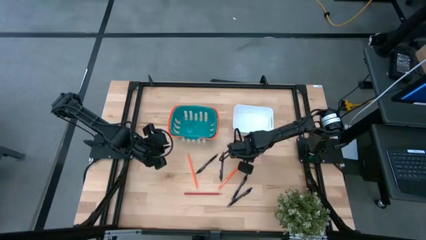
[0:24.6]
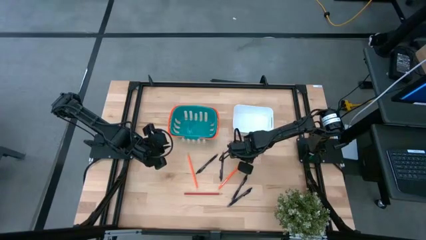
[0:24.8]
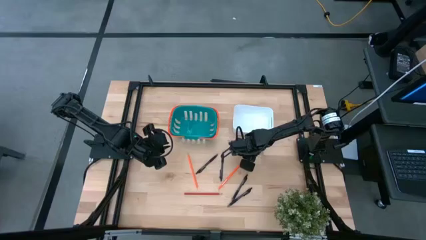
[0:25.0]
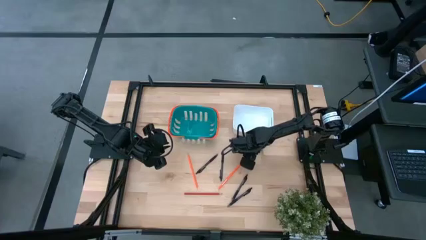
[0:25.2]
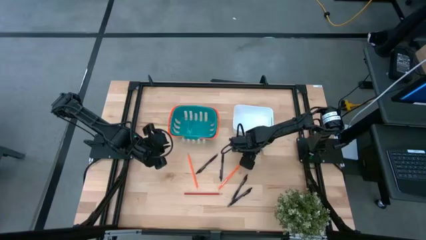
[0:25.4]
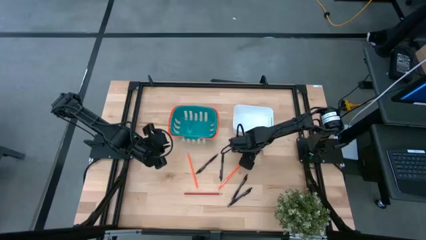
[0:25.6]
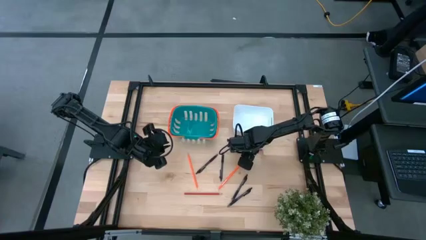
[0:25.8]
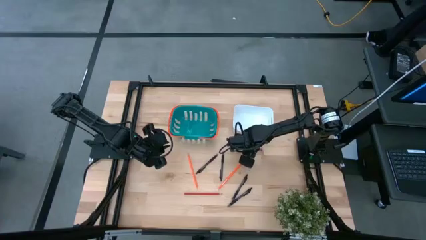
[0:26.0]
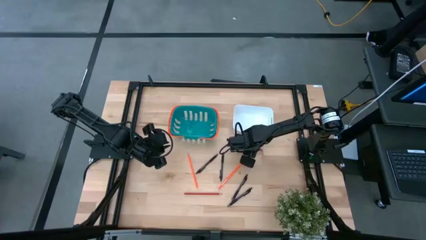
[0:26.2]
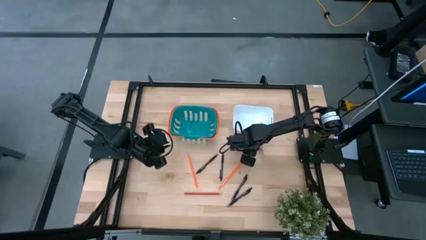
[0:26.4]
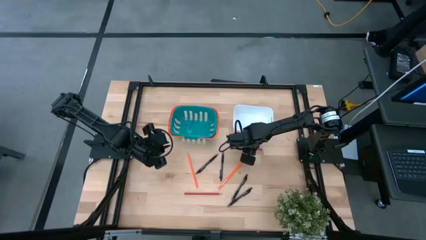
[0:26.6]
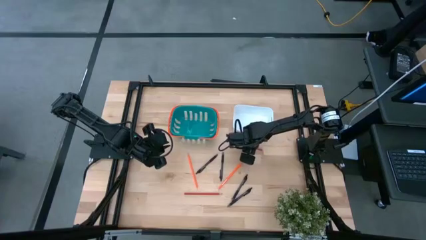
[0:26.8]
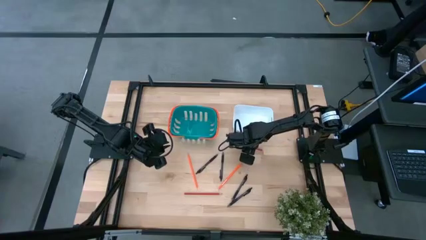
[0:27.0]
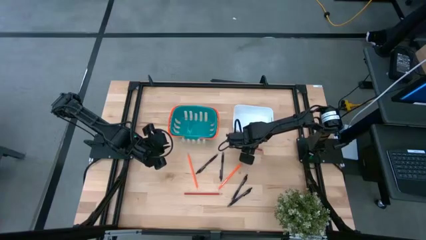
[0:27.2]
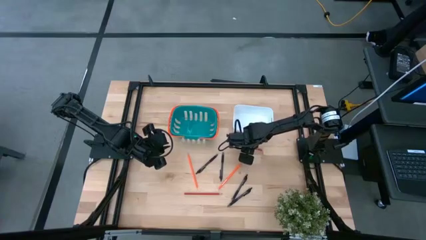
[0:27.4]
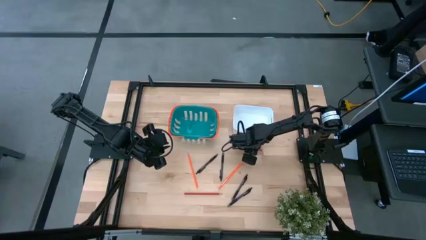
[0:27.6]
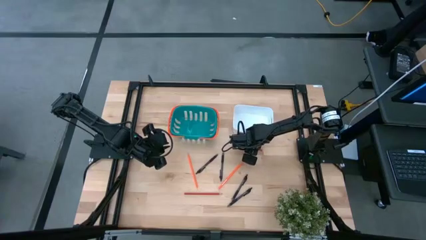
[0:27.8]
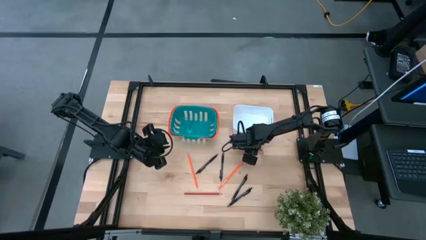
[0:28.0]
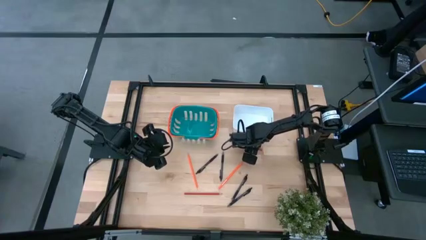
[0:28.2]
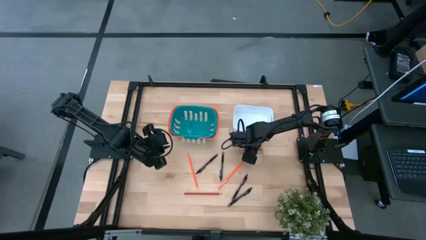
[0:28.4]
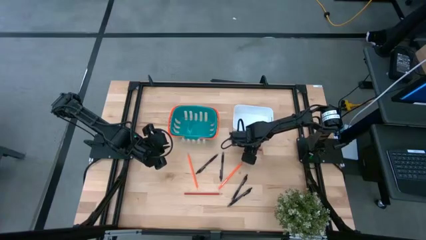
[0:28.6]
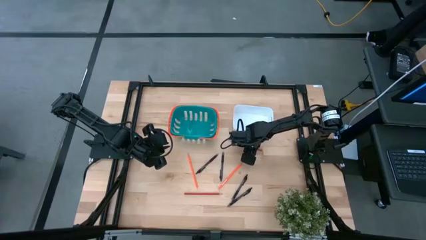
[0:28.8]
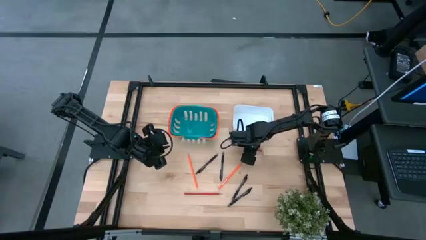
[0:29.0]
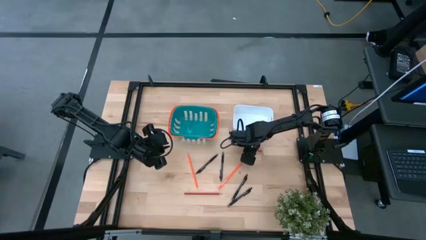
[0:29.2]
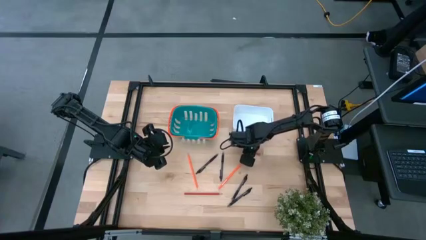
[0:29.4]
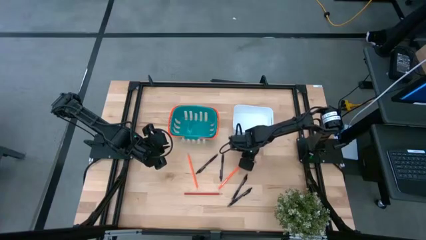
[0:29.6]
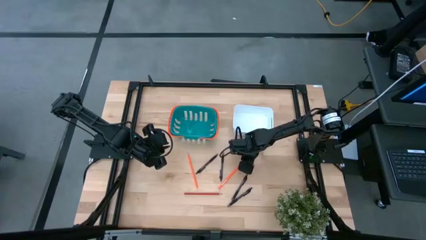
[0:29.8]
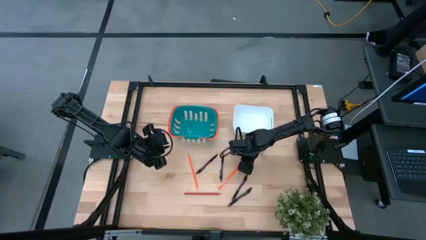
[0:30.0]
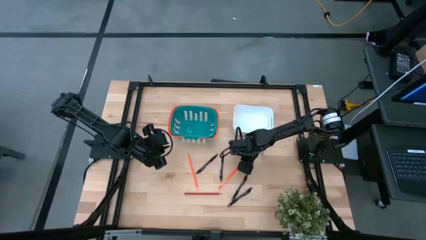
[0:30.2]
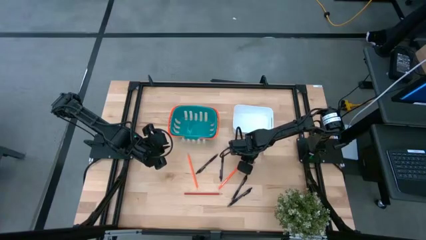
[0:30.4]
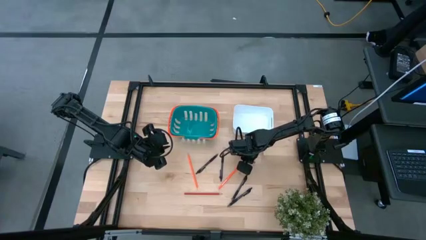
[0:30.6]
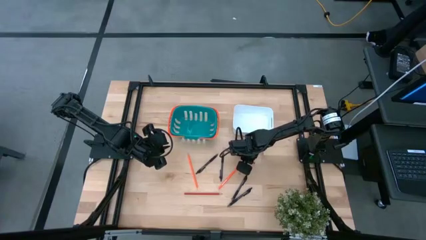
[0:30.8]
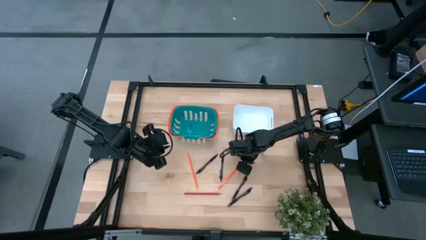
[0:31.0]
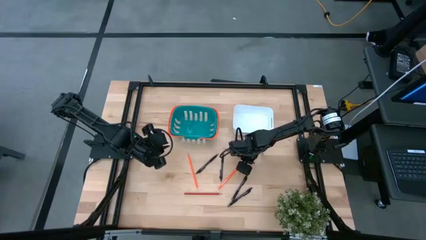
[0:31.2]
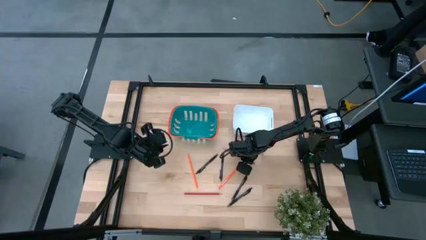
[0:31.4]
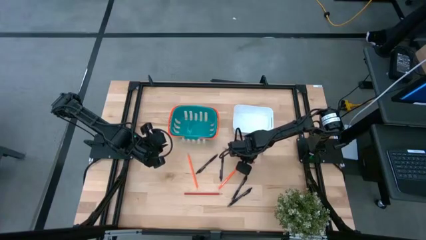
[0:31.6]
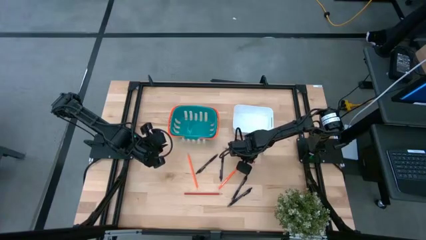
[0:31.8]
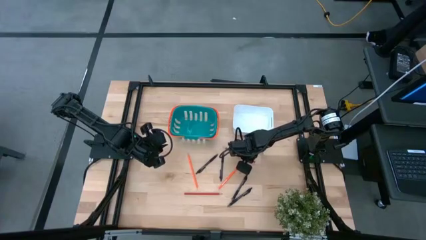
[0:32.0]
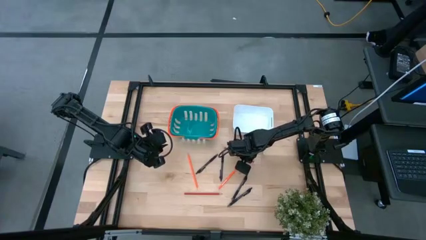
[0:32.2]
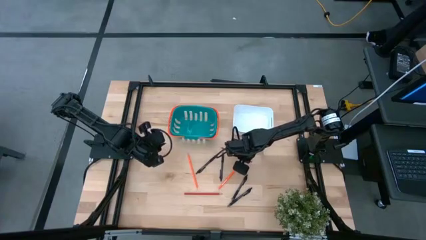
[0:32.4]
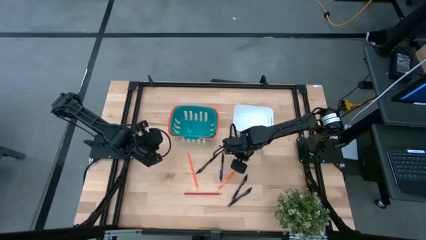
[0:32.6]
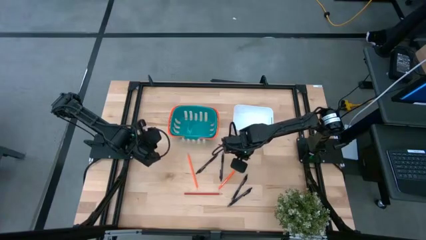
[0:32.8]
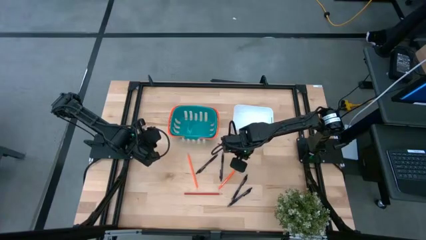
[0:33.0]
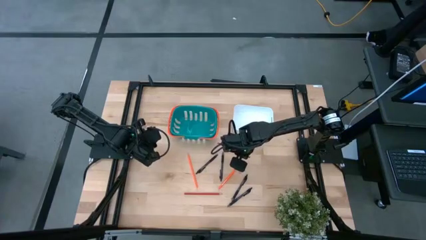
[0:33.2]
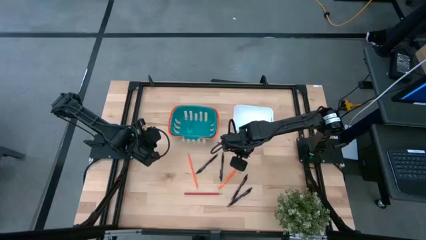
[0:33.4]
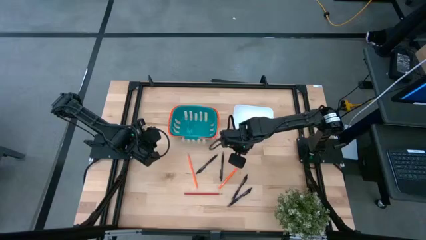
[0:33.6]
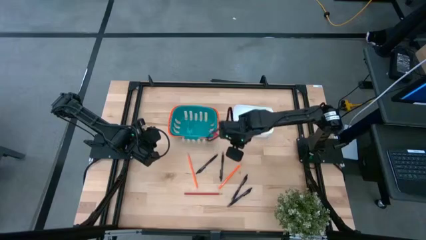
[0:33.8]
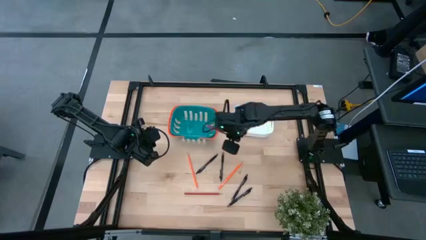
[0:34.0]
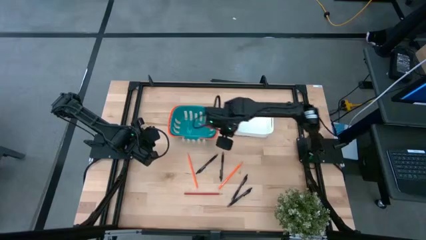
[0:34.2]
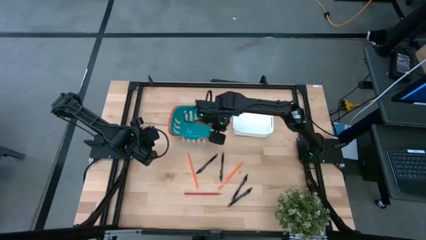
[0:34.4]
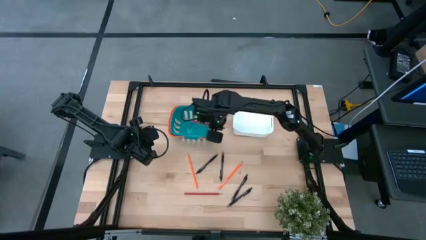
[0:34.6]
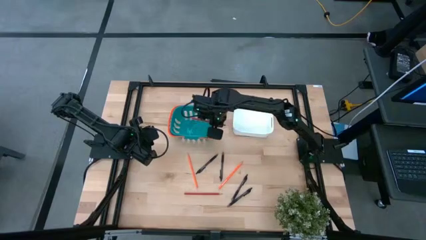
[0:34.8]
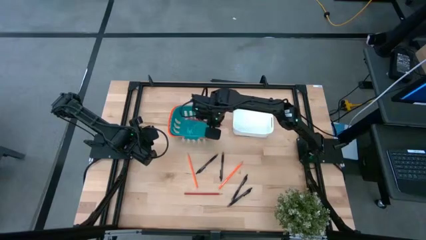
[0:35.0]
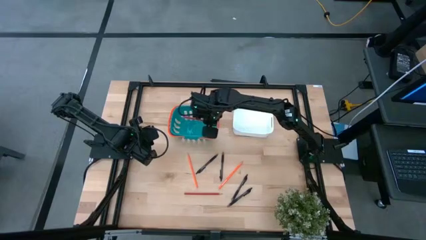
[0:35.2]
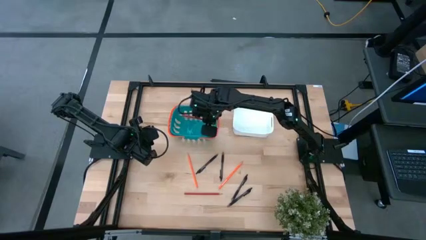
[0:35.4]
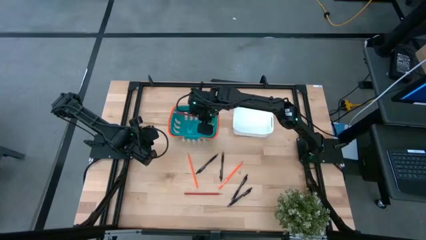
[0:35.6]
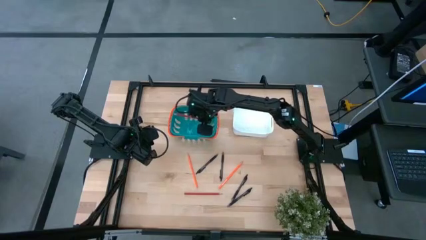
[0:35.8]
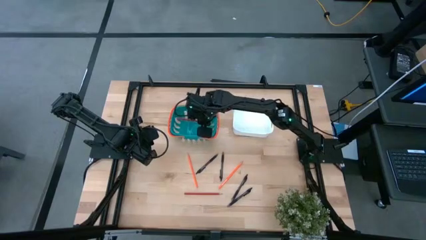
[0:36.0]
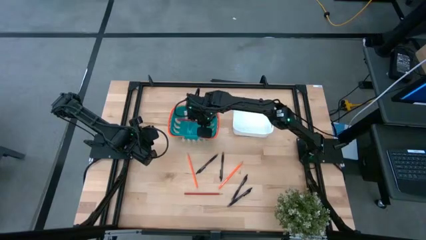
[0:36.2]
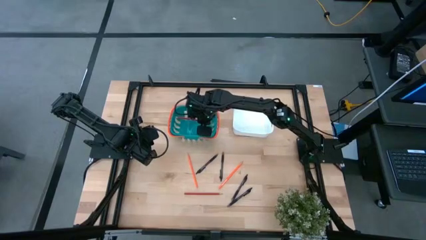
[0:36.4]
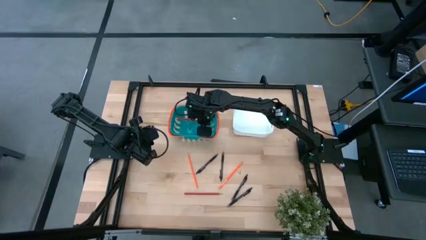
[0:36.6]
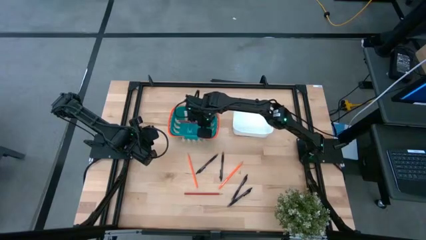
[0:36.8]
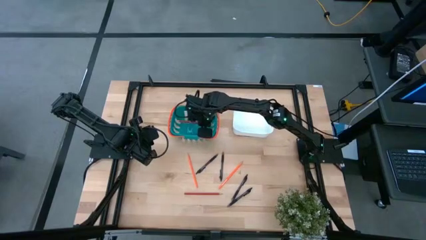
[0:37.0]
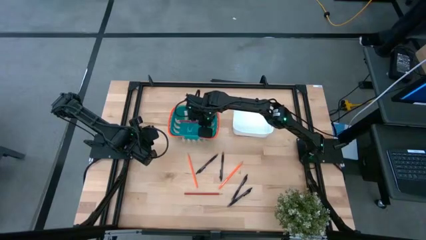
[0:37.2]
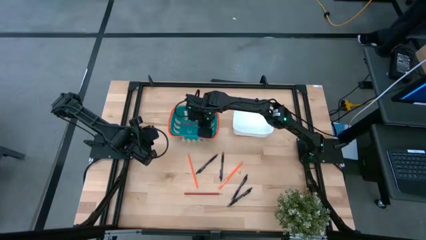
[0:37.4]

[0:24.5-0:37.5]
Task: Sort pens & pencils
Put the top red pencil into the blue bin

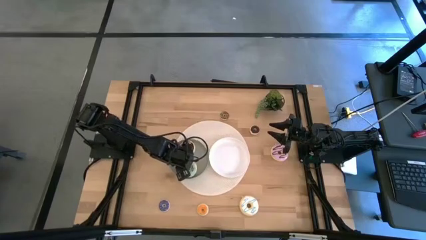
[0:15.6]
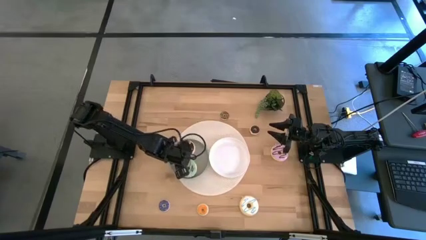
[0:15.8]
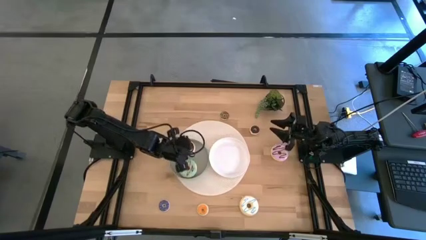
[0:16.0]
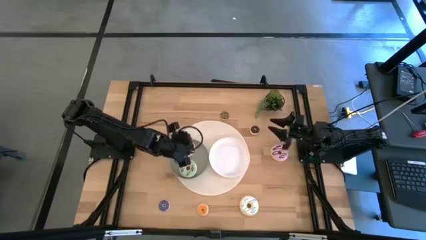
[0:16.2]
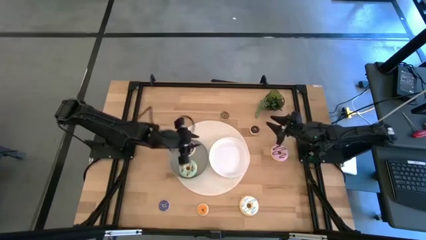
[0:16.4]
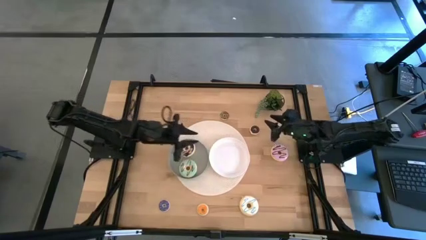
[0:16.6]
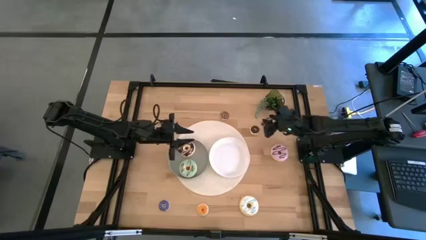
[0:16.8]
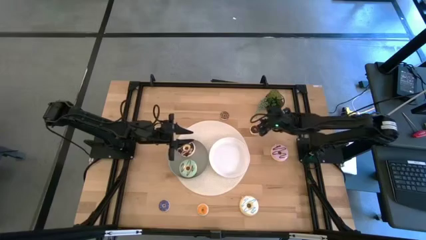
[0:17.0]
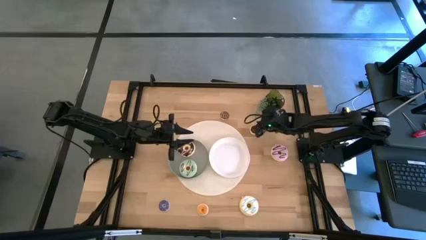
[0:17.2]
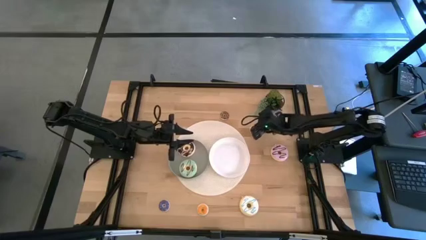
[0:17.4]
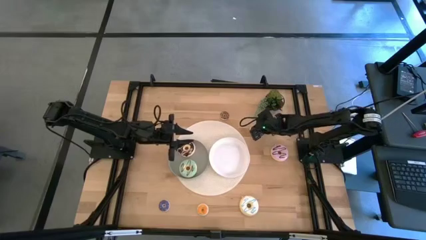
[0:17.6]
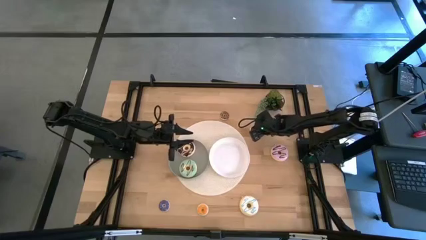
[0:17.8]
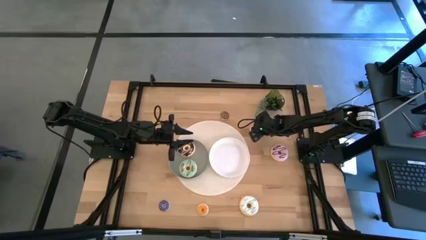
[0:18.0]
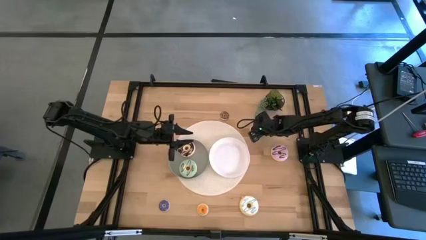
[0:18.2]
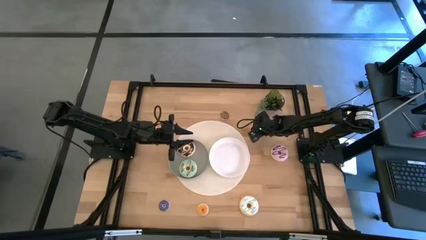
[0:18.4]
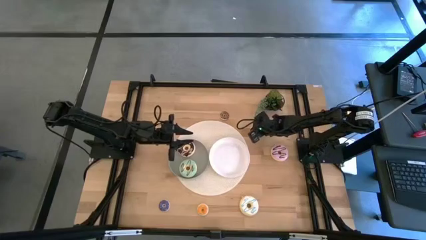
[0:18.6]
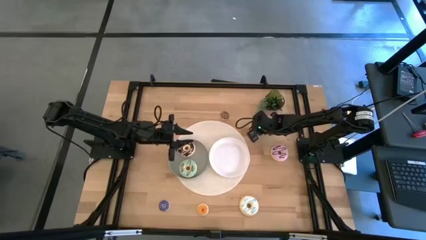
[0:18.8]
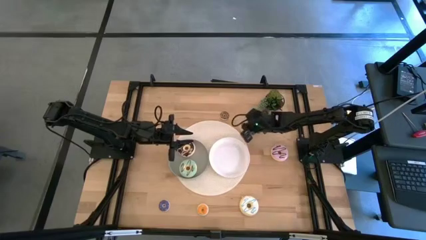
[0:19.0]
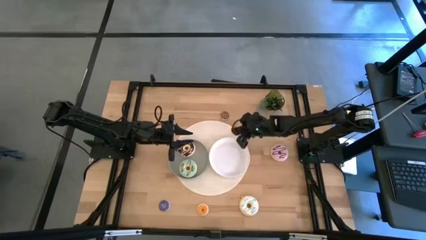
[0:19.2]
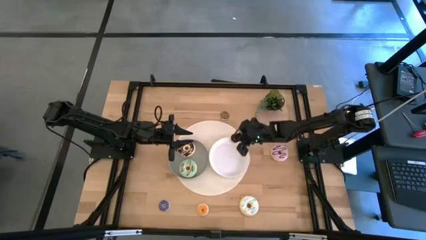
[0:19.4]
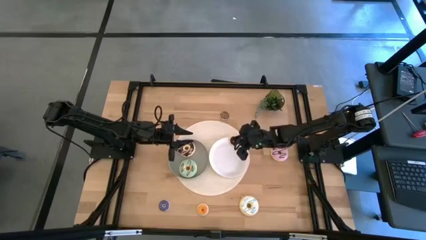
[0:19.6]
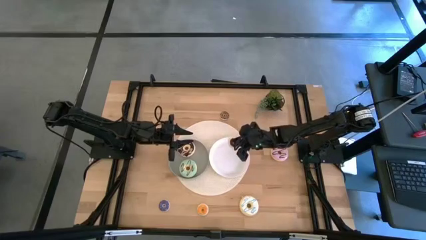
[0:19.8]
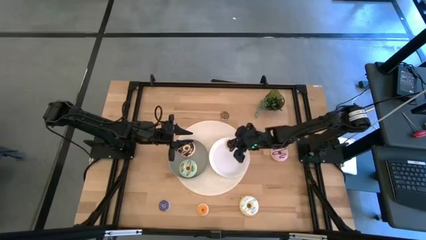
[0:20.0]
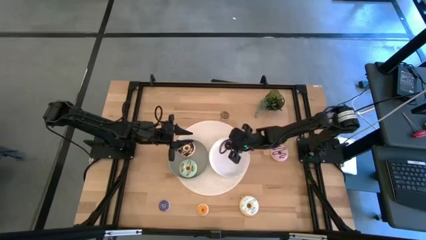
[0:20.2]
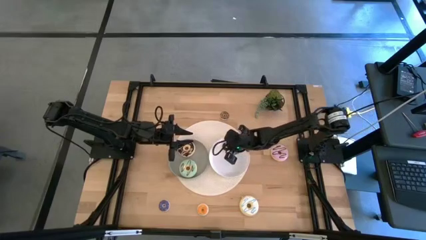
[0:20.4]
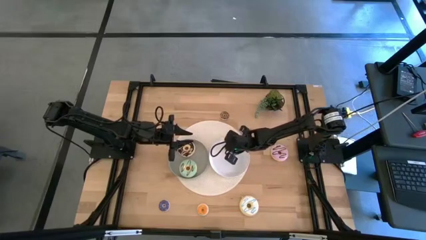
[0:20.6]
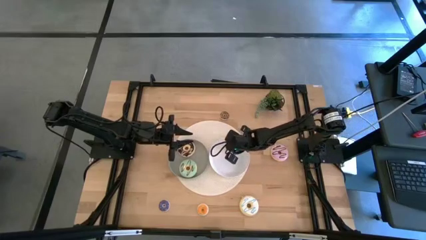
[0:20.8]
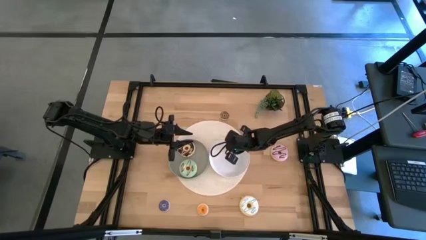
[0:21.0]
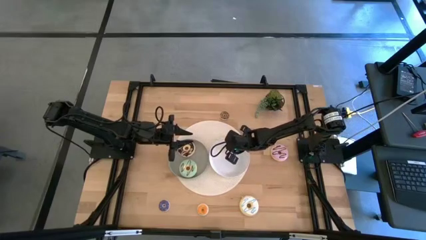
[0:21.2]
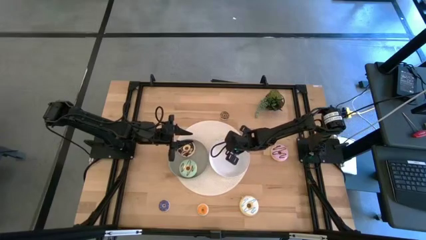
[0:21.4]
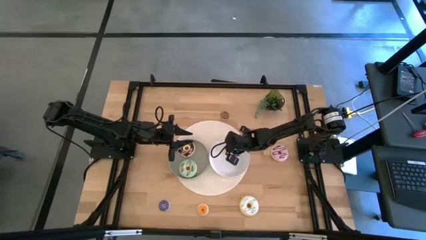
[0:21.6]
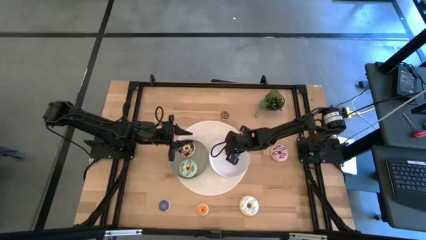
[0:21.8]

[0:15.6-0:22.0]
Task: Pick & Place donuts
Put the small dark brown donut on the white plate
